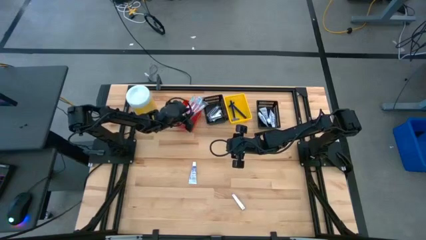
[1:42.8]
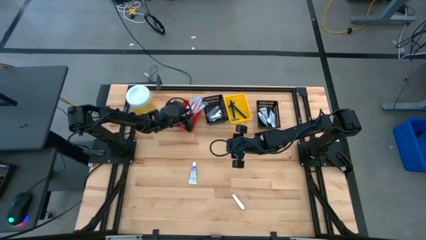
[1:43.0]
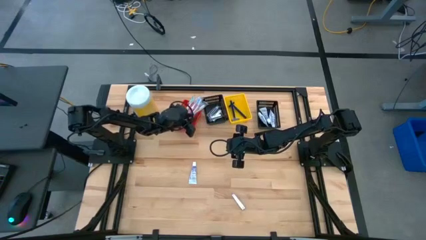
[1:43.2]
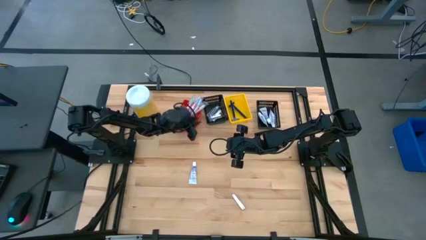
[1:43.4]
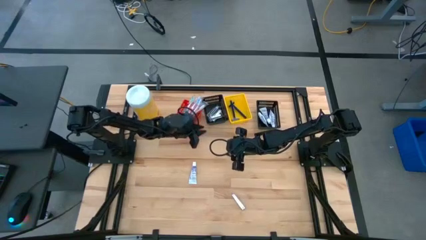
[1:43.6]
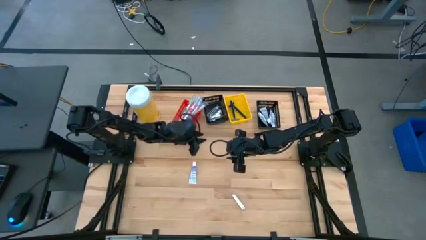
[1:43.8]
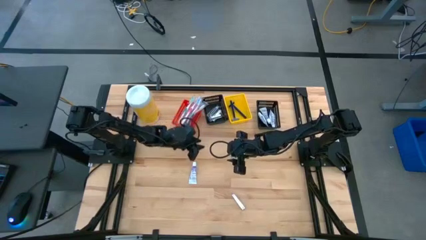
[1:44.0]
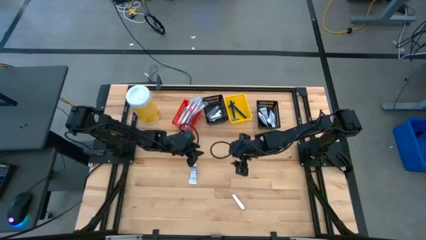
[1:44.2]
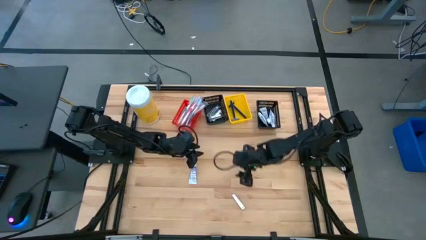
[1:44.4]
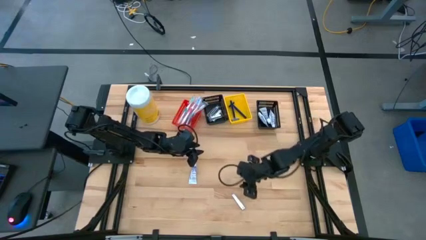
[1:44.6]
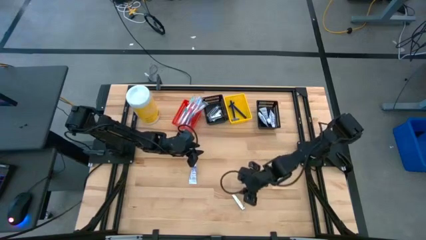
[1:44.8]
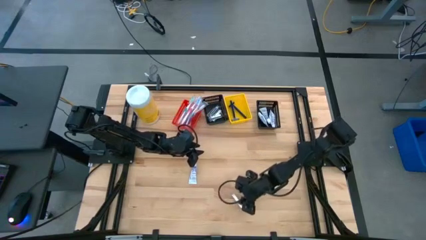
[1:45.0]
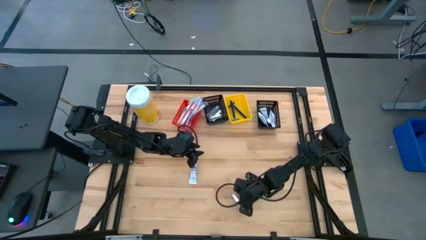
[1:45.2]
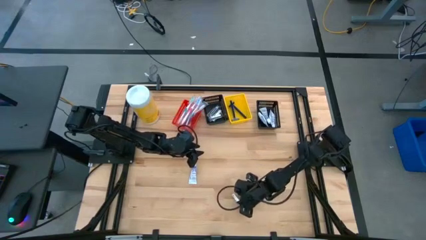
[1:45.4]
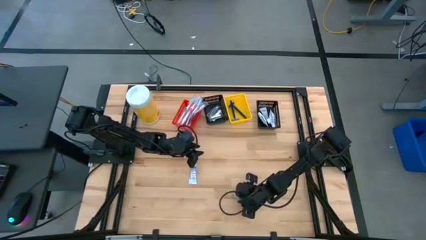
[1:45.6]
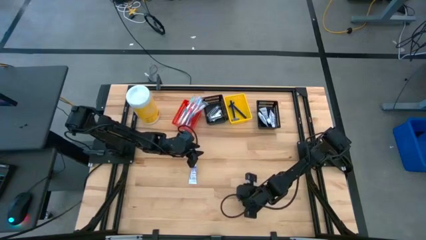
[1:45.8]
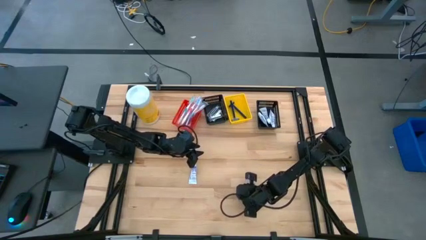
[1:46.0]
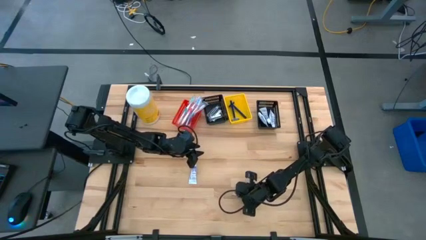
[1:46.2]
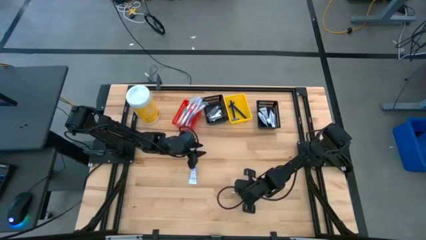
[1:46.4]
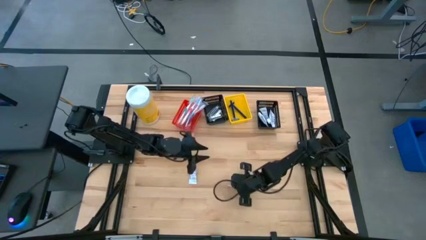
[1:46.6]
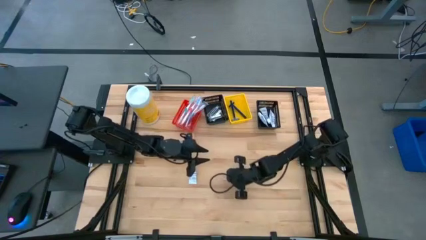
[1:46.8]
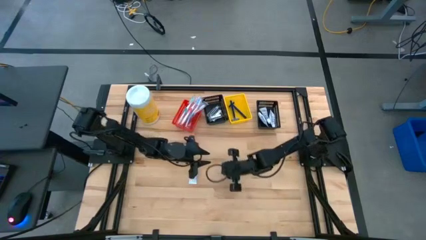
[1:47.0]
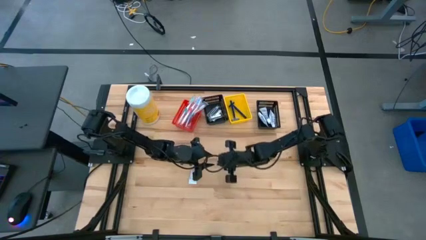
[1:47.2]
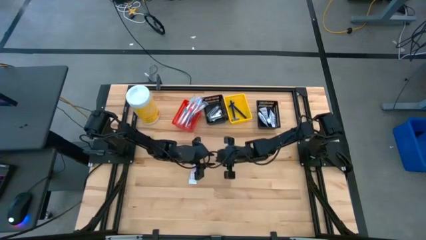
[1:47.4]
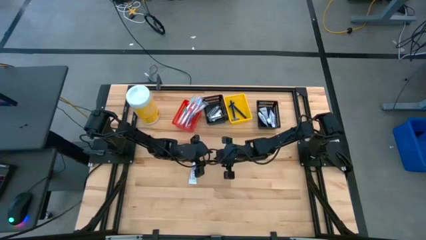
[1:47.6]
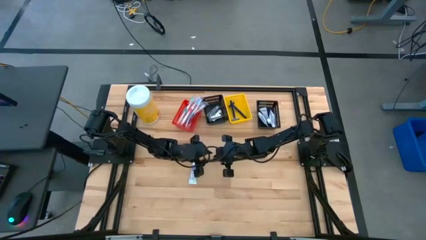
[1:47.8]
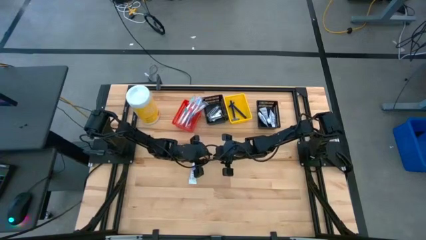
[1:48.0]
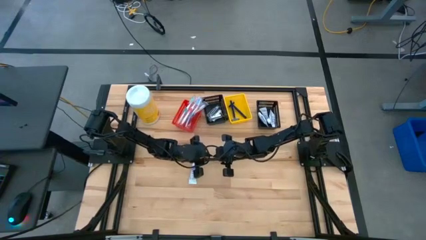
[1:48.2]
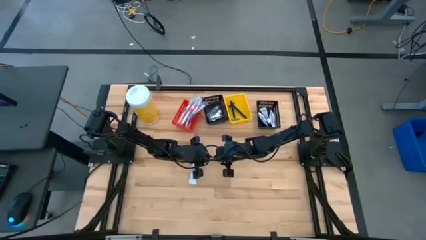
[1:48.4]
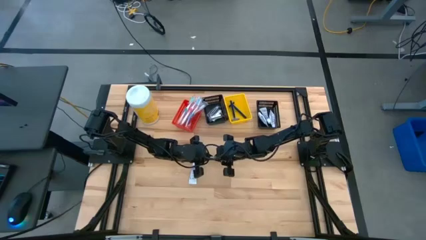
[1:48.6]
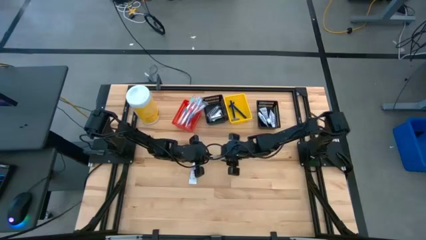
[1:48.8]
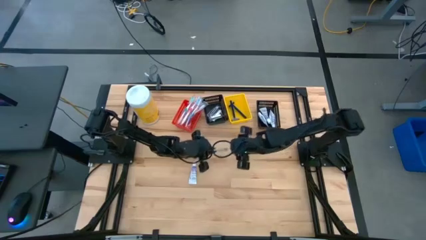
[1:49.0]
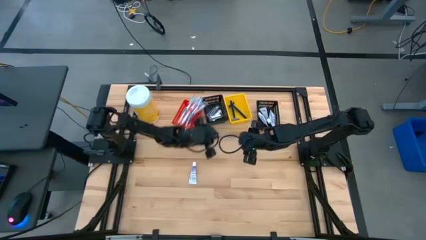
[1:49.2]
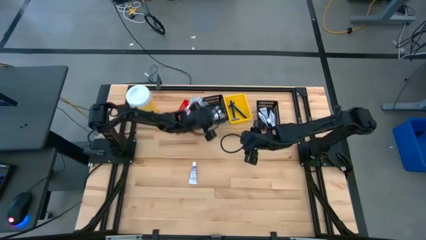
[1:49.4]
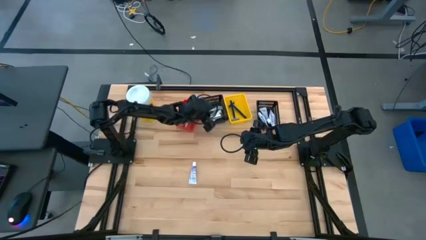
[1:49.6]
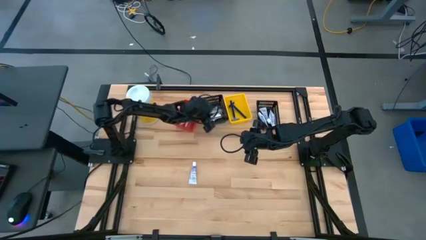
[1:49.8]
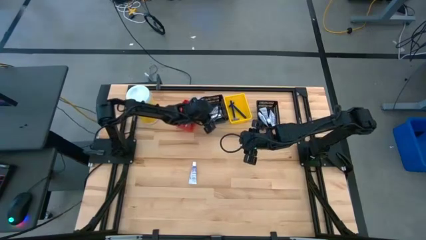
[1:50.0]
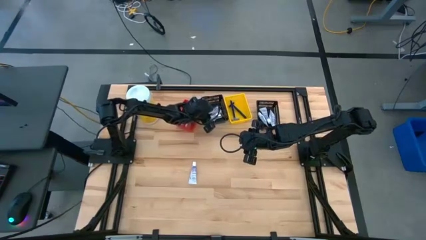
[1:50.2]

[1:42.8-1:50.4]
Task: Pick & Place Travel size toiletries
Put the silver nail cutter into the left black bin

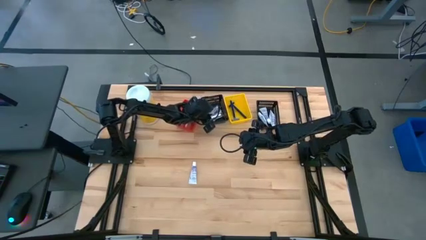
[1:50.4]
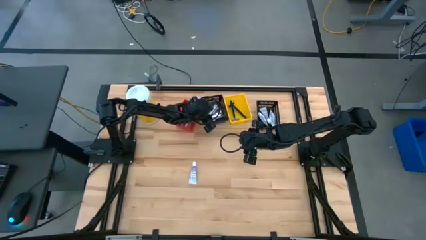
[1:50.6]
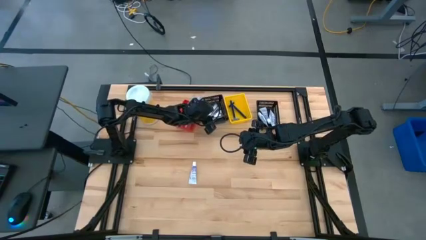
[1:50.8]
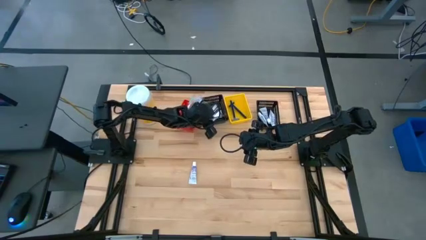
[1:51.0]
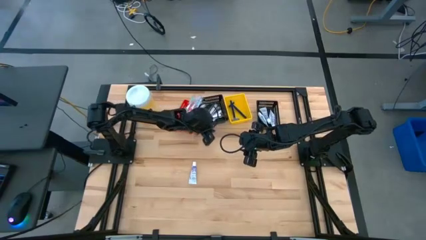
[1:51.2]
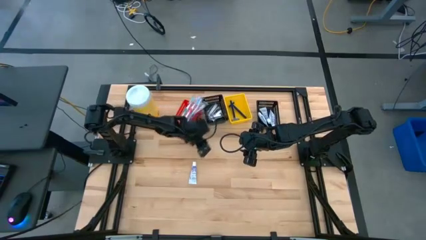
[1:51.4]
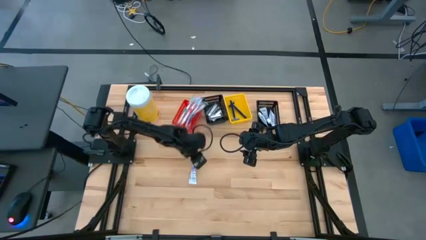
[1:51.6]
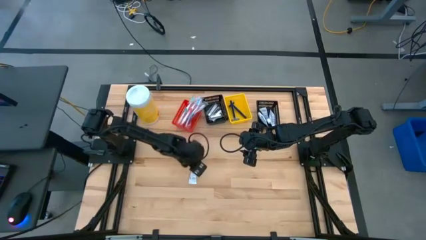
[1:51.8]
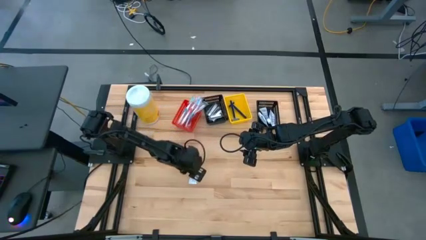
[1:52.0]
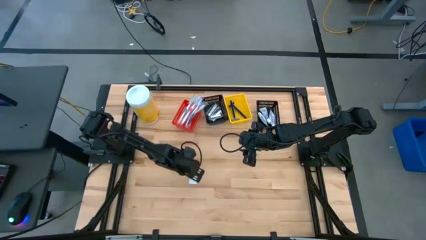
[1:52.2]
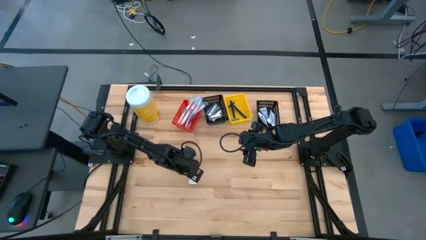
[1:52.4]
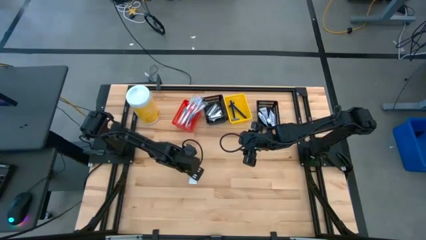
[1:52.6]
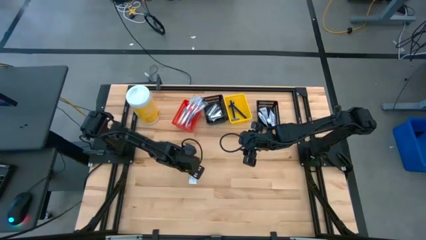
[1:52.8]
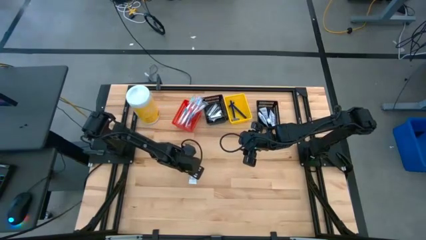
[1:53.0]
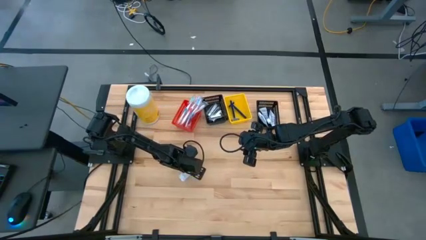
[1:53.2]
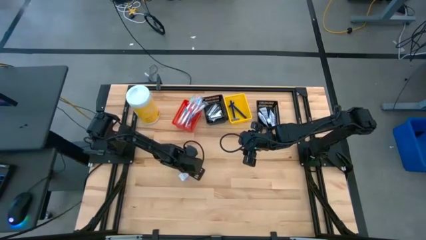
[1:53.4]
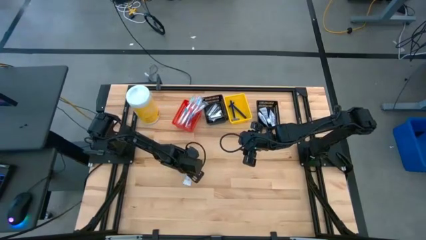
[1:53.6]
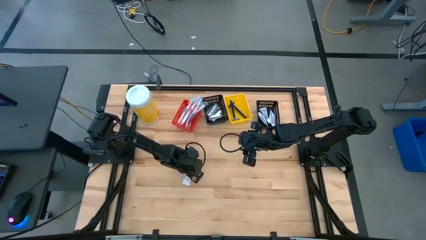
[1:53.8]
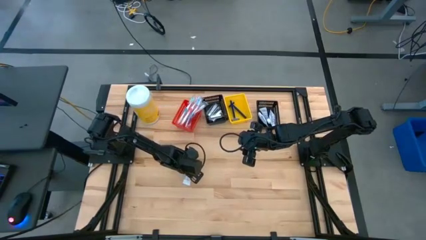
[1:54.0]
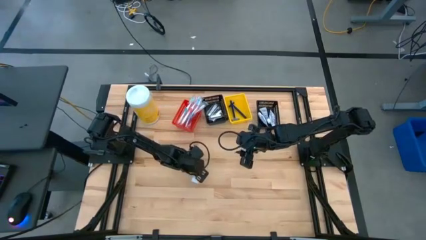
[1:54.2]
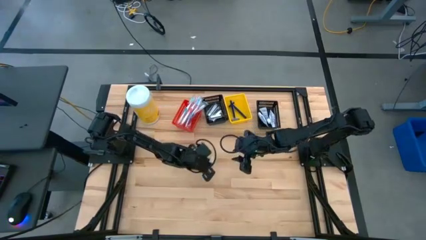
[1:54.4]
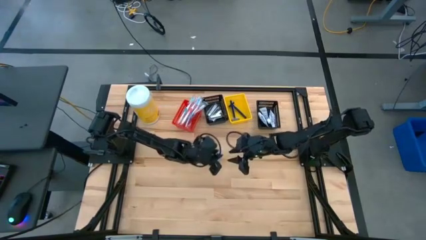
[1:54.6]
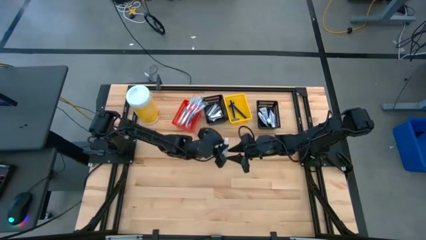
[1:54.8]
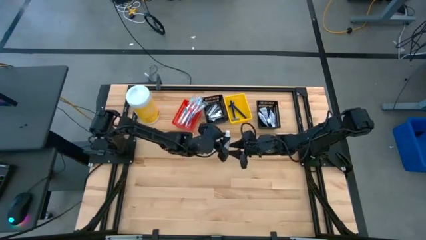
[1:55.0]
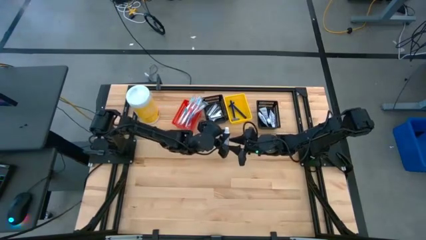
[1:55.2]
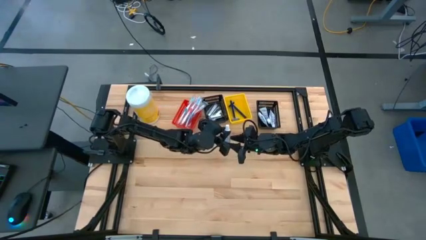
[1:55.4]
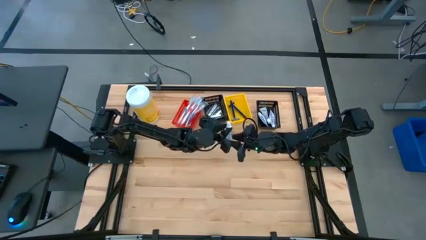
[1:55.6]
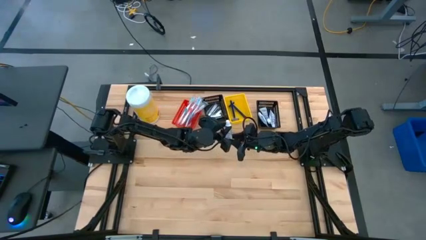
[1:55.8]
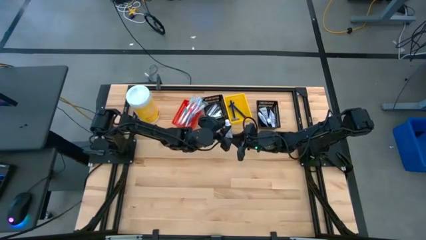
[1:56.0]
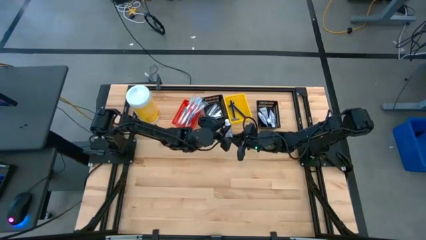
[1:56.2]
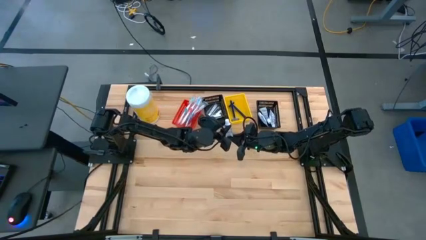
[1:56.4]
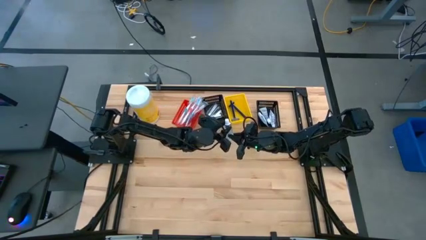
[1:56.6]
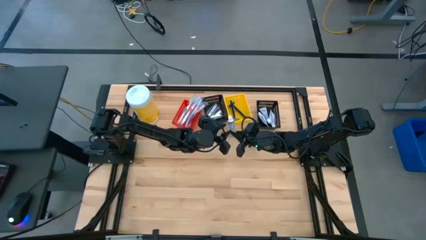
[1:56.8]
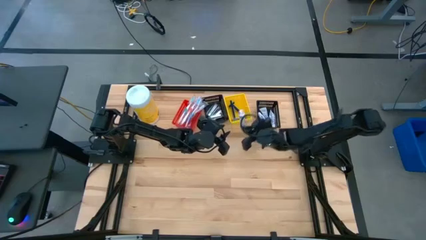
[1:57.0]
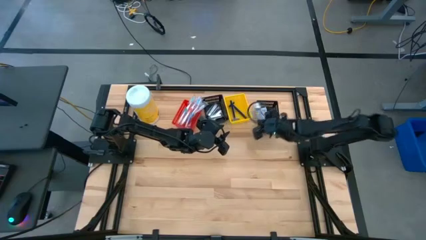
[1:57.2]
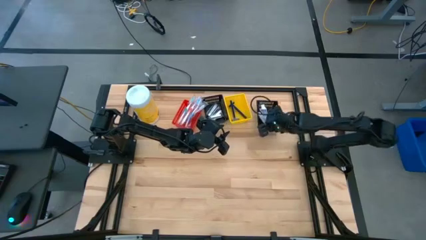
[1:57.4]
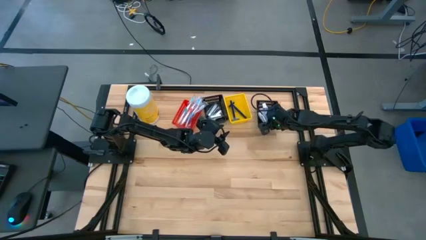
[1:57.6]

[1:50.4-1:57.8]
Put the purple toothpaste into the right black bin
